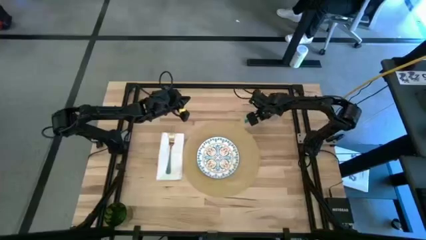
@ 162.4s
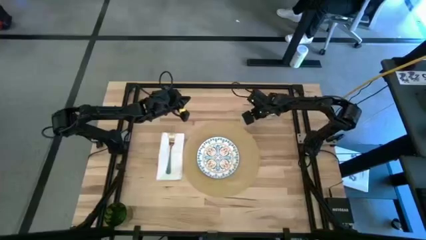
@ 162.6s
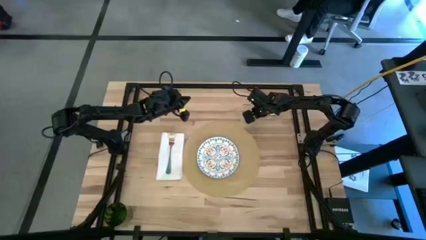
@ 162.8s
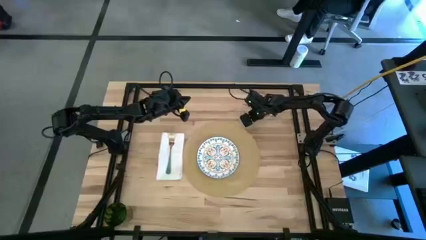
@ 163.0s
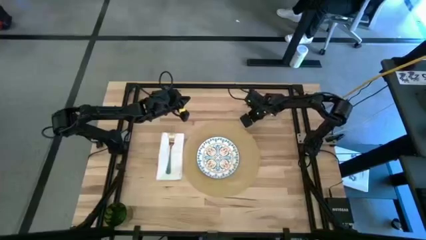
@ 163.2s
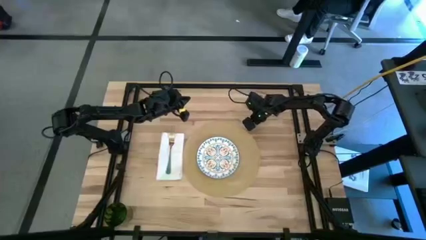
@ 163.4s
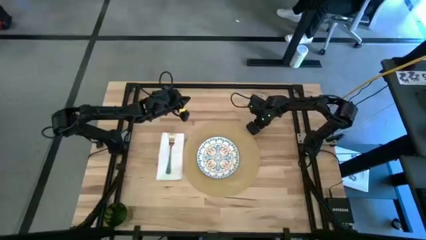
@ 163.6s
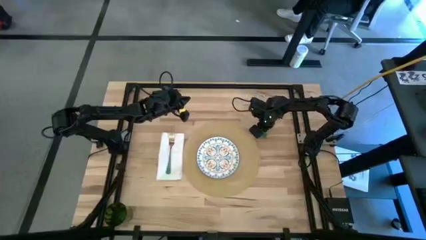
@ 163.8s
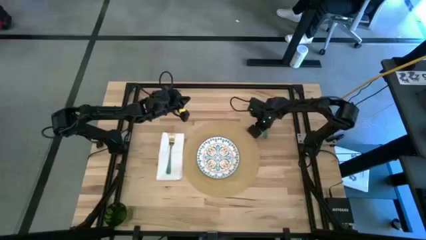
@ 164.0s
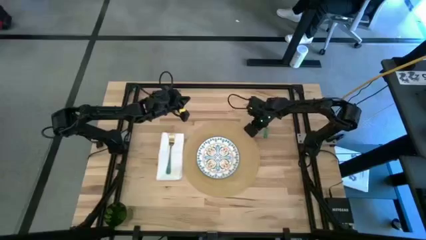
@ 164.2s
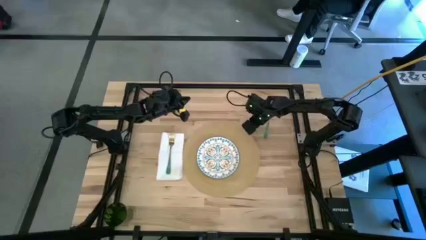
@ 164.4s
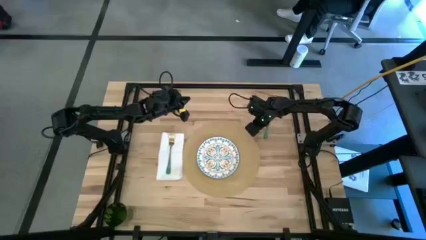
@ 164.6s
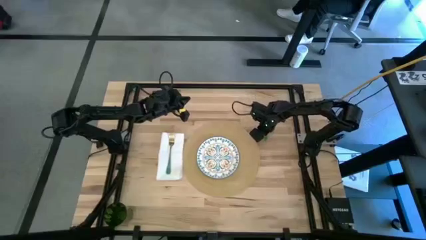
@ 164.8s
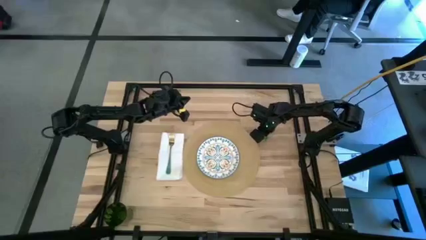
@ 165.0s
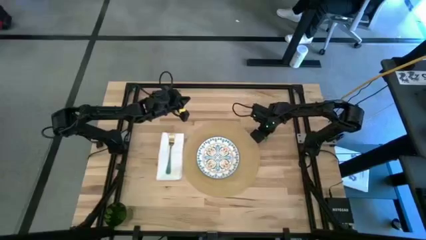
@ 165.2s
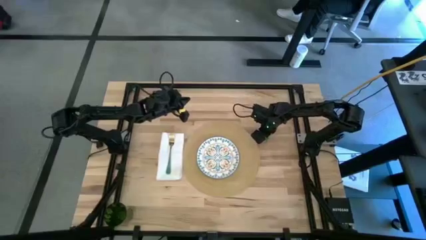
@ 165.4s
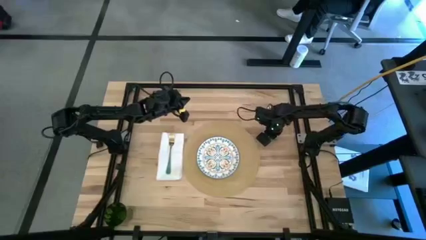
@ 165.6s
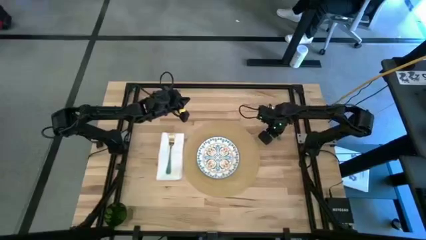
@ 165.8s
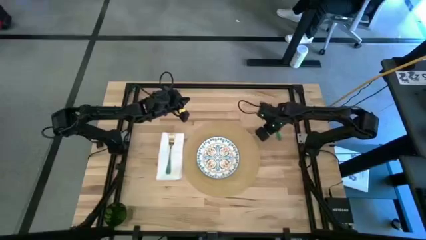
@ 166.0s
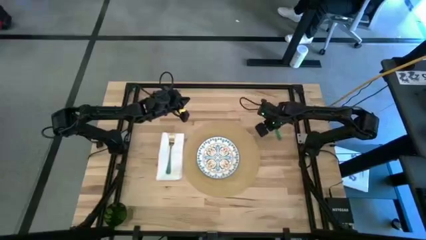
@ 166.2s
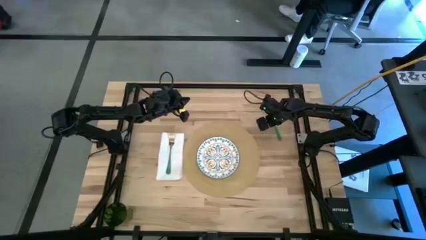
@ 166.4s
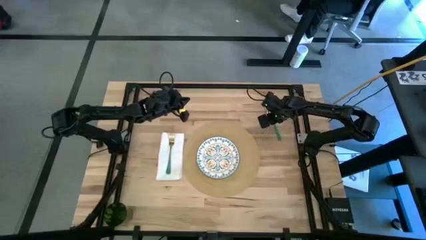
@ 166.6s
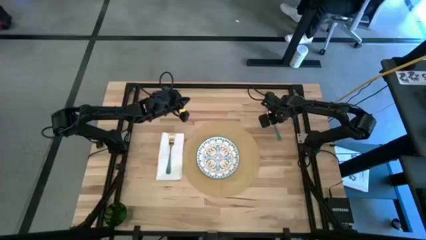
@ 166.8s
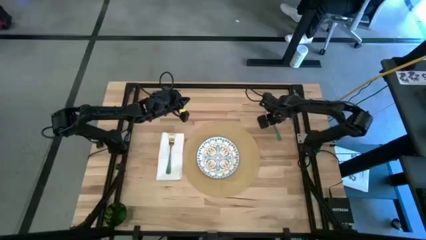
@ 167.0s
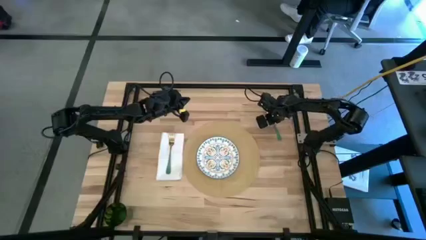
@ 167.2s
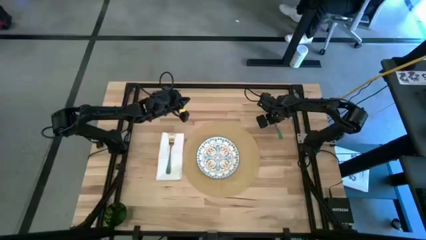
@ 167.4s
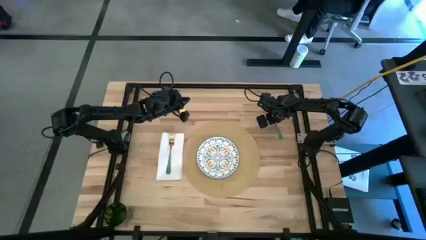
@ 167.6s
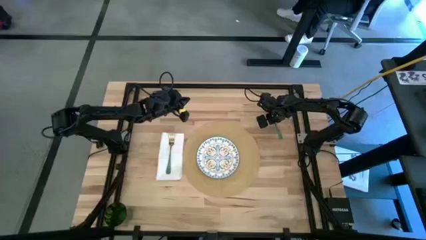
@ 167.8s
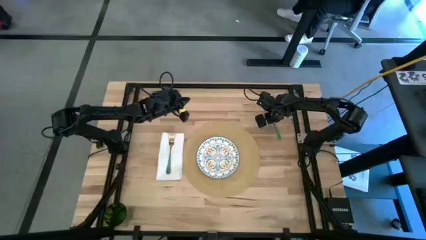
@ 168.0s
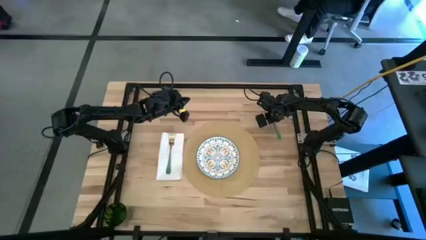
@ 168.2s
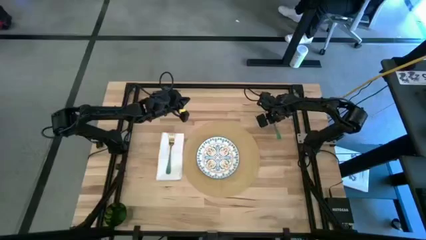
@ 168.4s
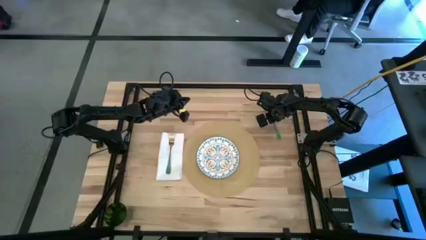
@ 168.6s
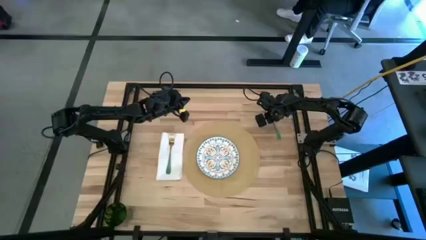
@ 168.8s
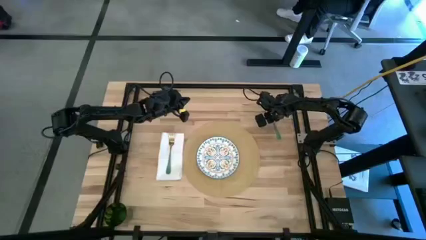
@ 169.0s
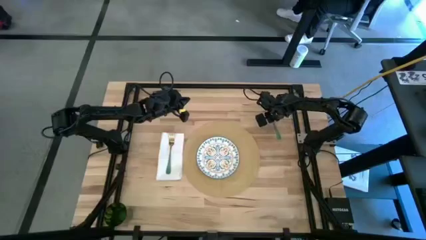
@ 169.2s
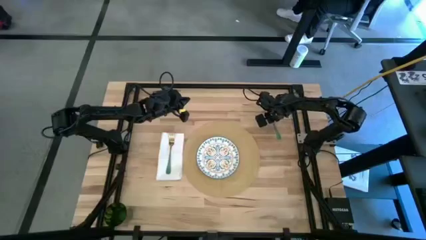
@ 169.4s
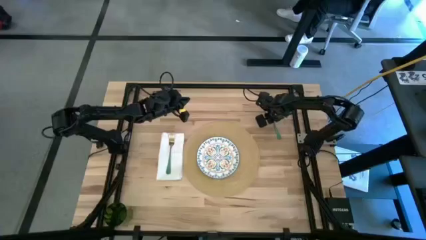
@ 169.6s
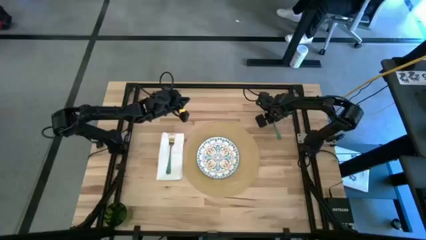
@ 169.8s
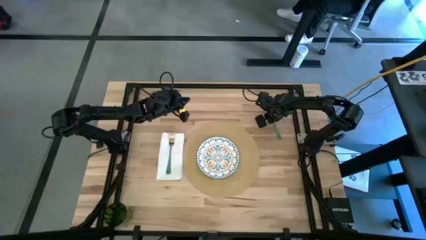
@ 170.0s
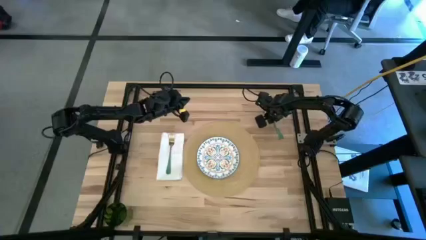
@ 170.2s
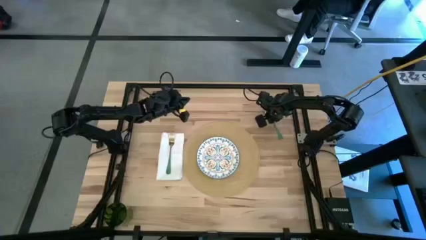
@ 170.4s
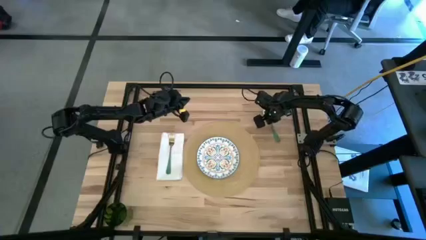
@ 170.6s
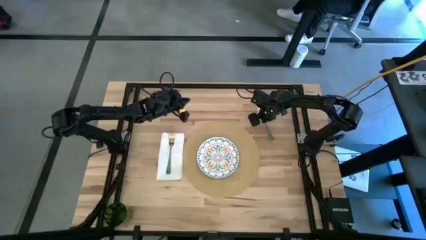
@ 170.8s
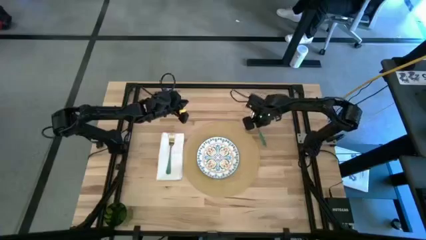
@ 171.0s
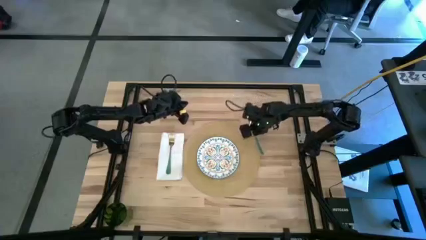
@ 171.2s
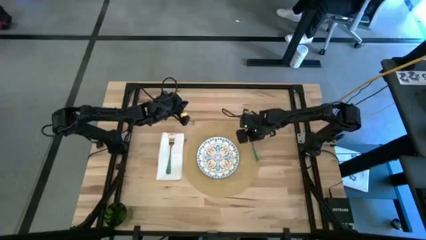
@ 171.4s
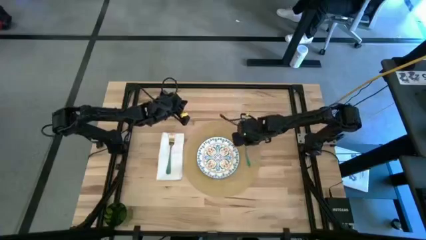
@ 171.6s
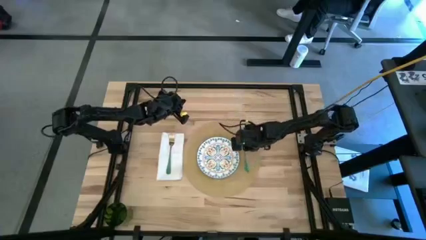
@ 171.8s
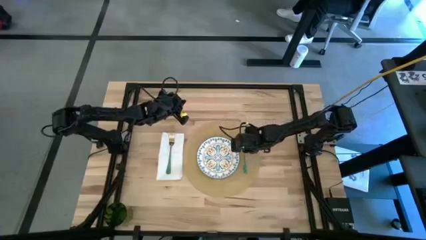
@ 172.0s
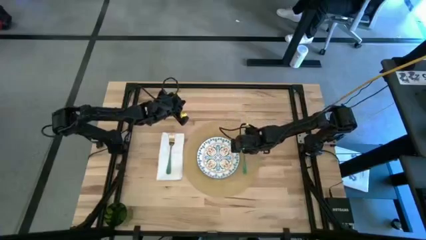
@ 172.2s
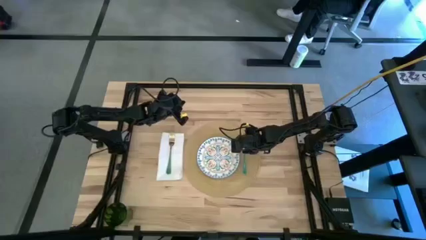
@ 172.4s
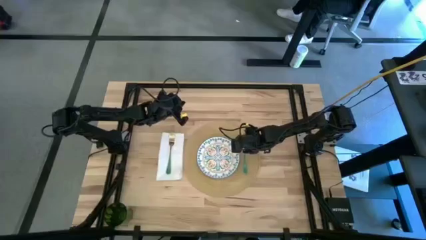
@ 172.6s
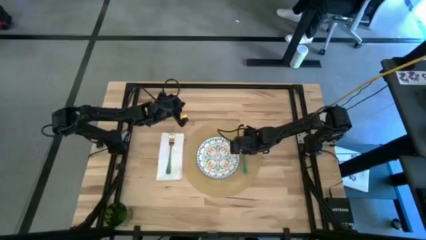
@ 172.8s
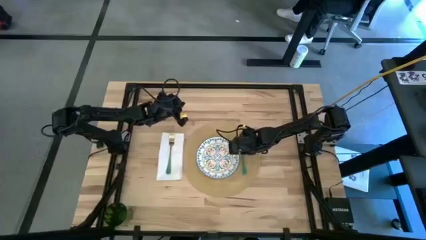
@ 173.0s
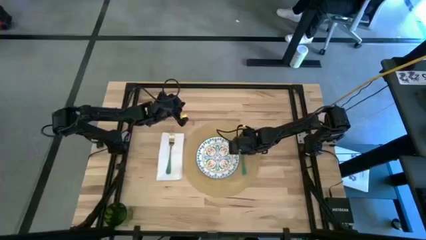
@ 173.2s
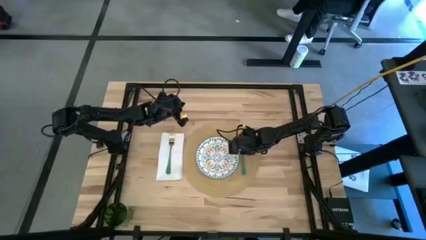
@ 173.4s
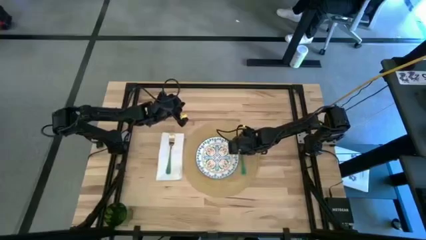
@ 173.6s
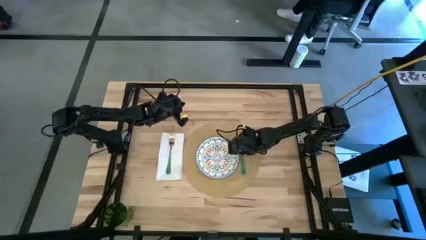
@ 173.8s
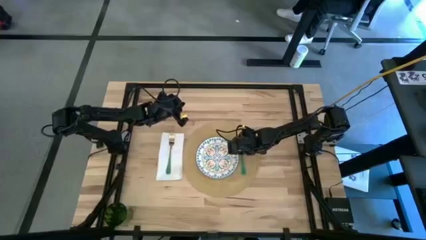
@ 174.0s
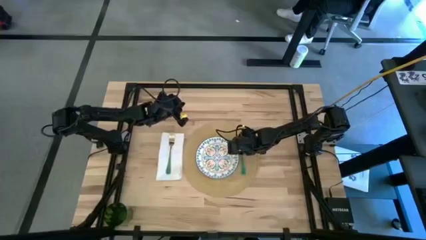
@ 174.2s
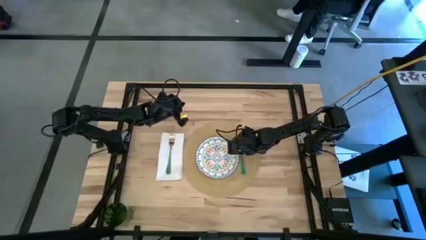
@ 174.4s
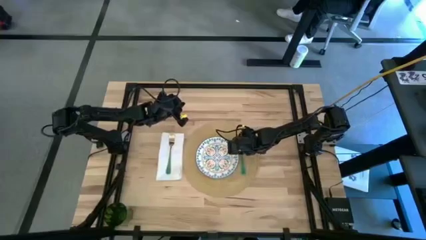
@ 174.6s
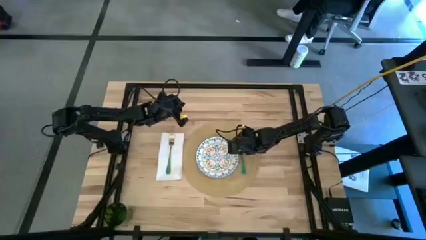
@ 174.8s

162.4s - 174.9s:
Task: Set table place
Put the green spoon to the right of the blue patterned plate on the brown place mat

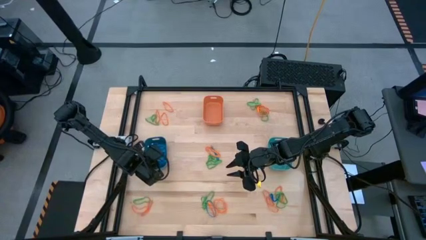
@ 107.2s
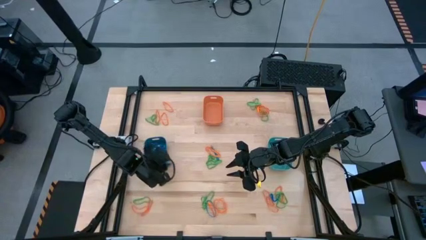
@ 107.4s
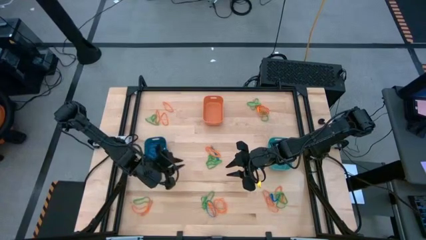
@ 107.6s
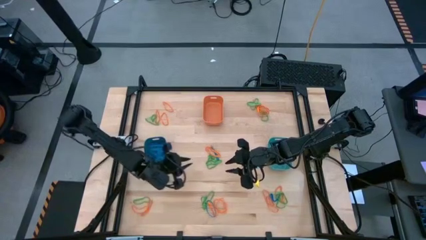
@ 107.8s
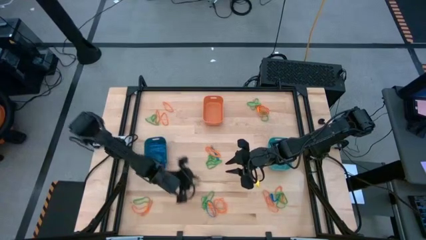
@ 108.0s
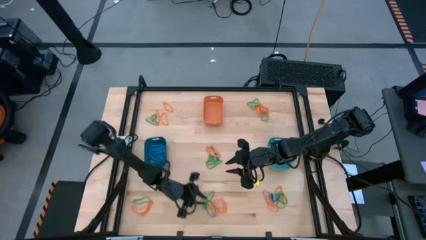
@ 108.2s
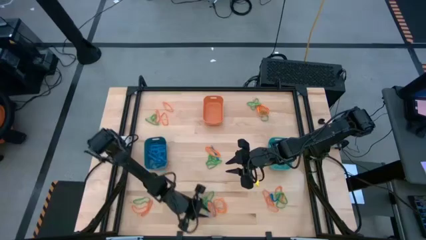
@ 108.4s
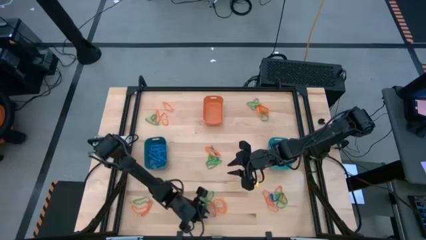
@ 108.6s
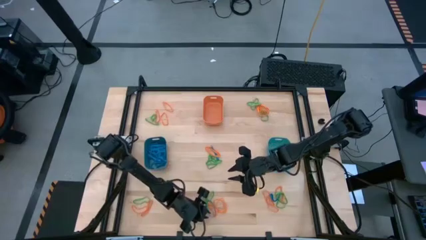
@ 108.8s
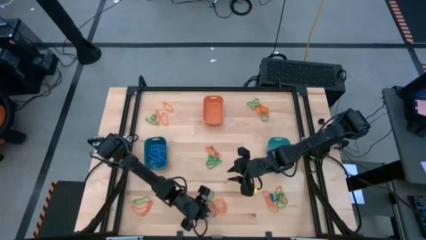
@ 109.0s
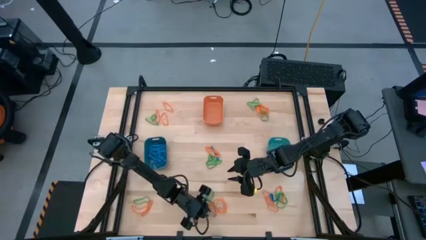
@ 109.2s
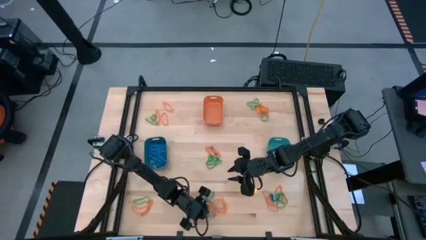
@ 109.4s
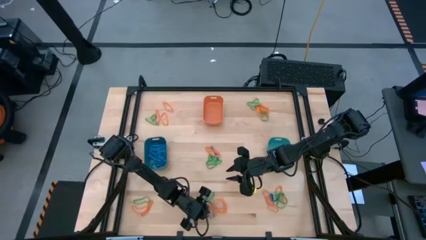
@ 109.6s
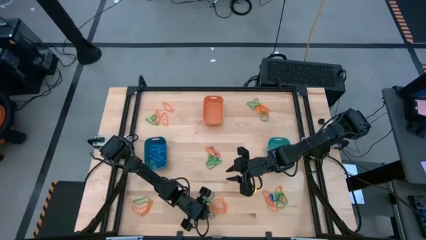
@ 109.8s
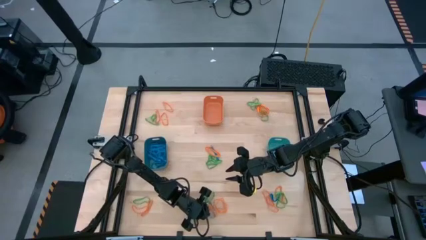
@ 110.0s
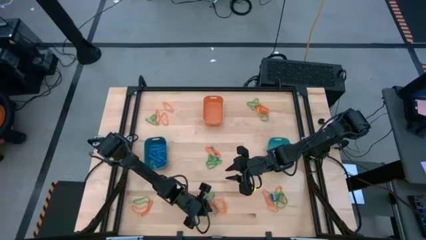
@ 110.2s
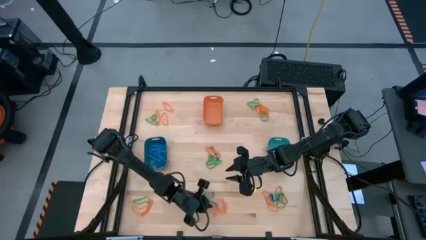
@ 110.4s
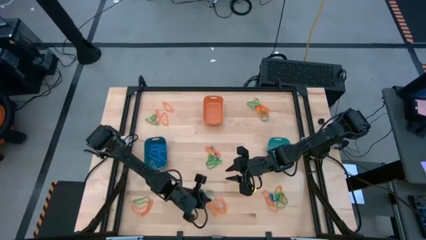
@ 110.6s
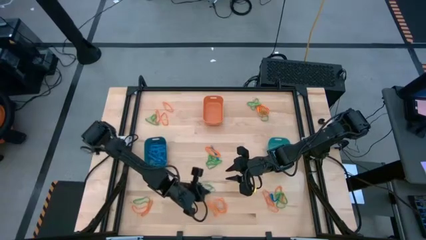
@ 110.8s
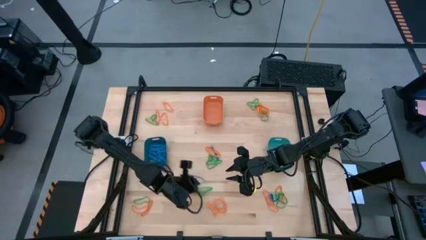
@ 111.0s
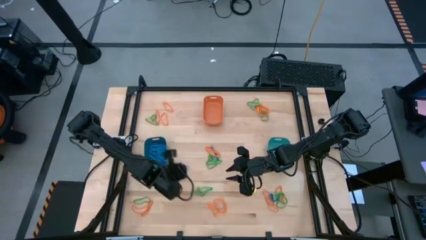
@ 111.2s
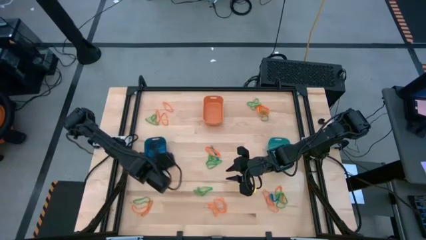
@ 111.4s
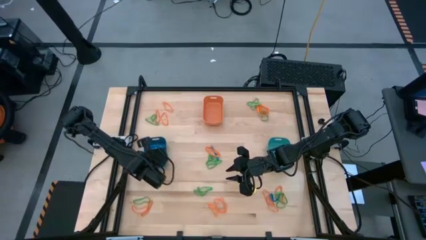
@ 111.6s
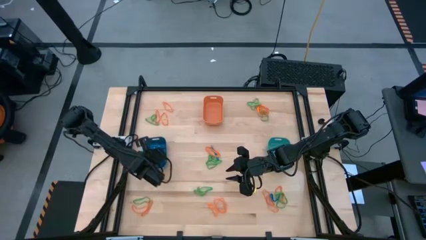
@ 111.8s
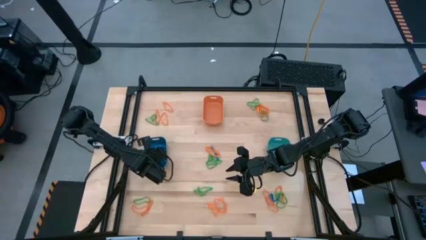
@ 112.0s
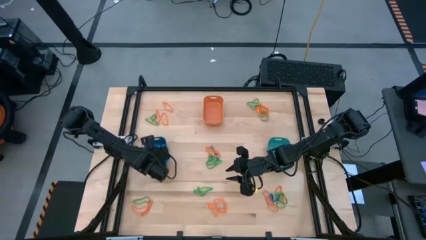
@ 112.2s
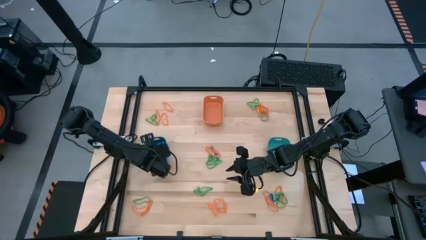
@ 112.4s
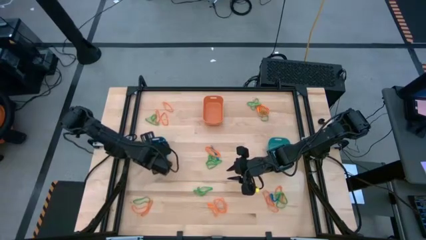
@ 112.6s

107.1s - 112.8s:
Task: Sort rubber bands into baskets
Put the blue rubber band into the blue bin
